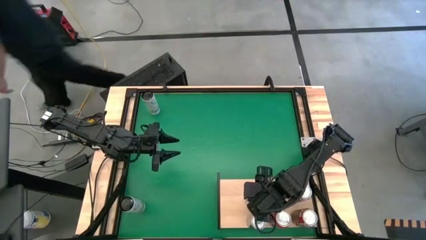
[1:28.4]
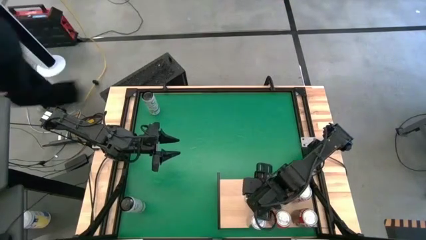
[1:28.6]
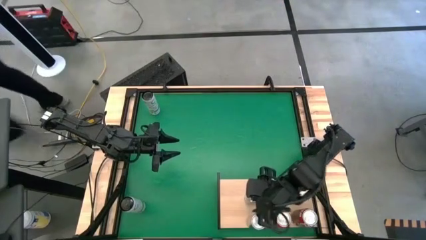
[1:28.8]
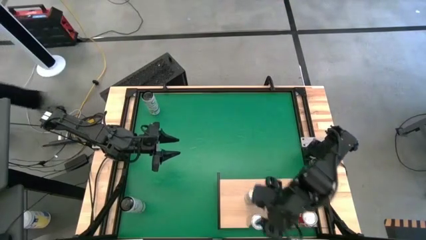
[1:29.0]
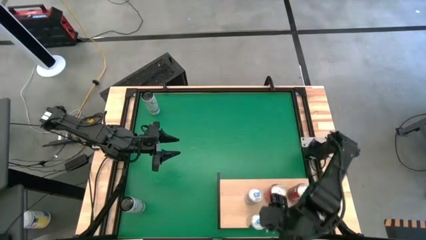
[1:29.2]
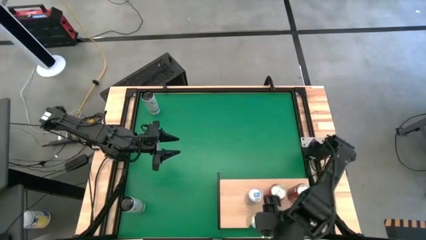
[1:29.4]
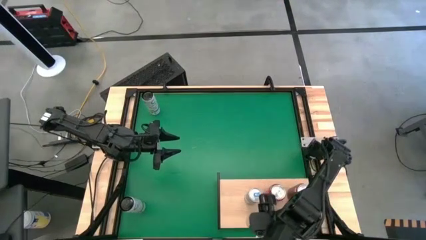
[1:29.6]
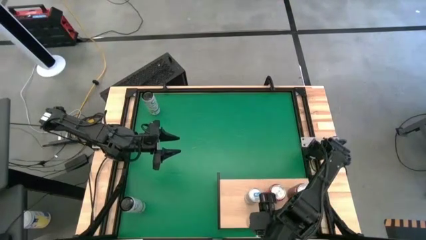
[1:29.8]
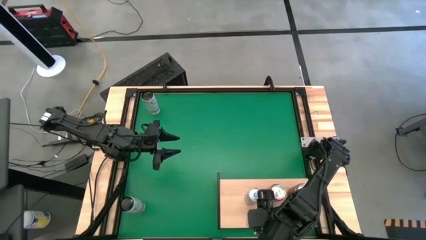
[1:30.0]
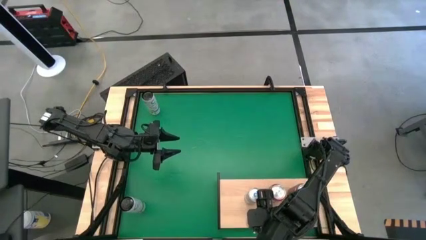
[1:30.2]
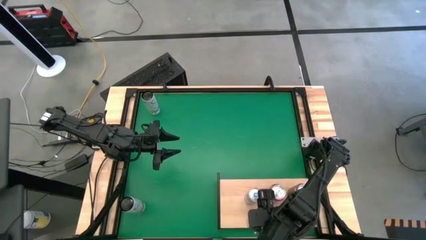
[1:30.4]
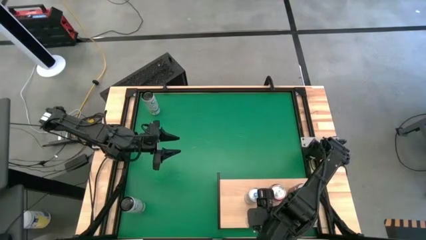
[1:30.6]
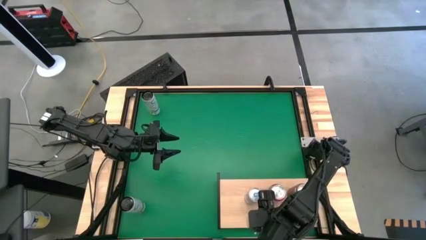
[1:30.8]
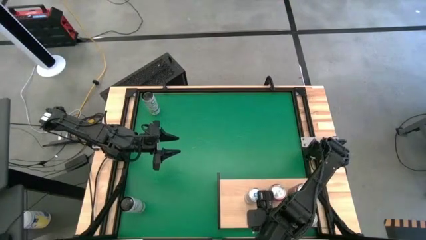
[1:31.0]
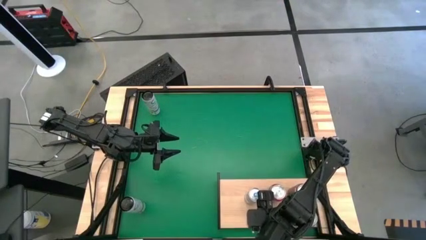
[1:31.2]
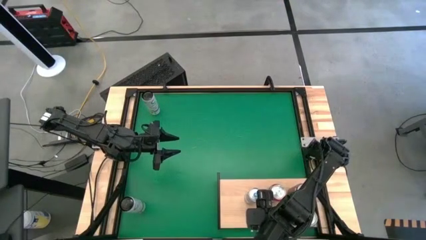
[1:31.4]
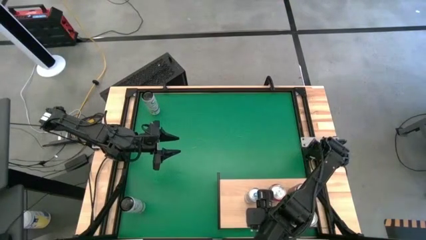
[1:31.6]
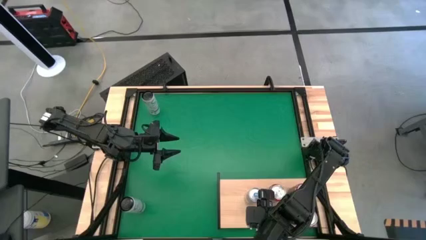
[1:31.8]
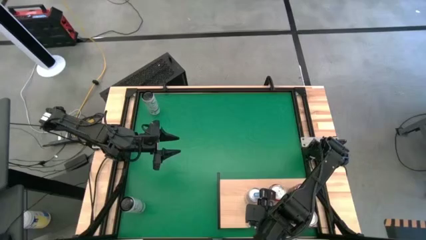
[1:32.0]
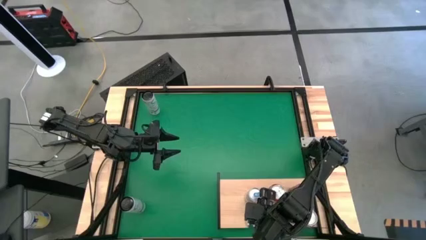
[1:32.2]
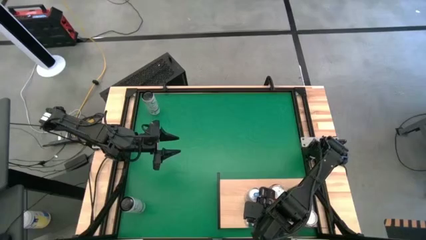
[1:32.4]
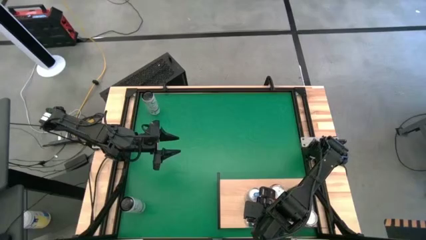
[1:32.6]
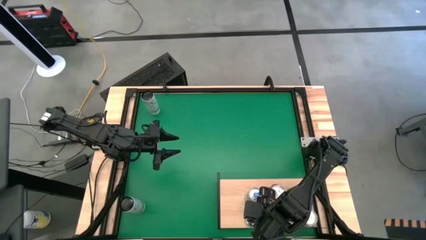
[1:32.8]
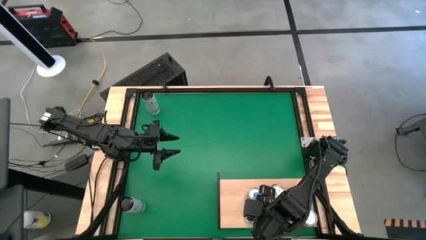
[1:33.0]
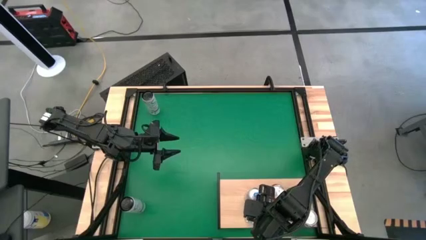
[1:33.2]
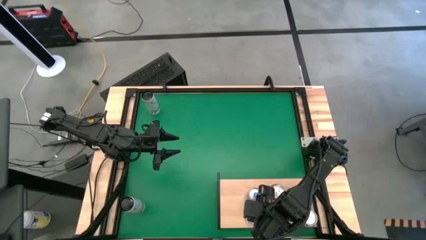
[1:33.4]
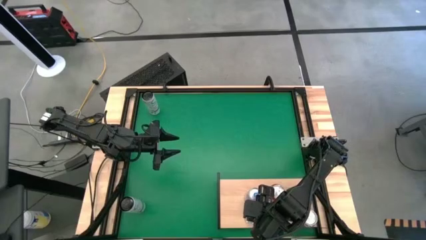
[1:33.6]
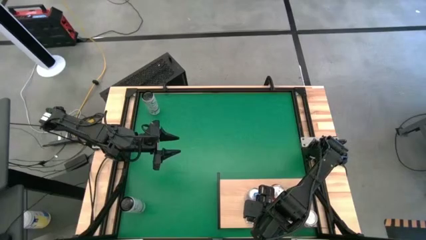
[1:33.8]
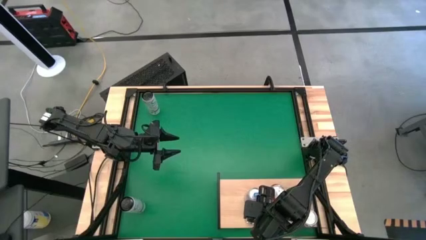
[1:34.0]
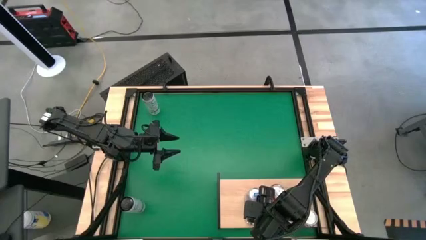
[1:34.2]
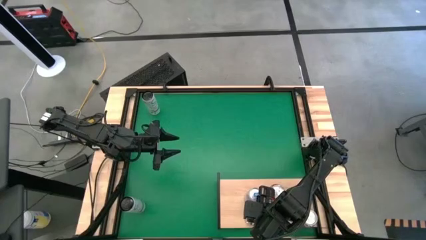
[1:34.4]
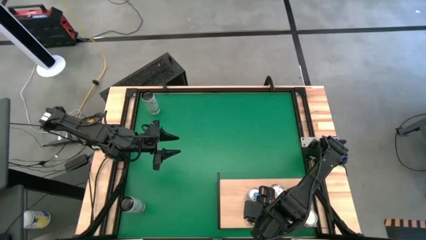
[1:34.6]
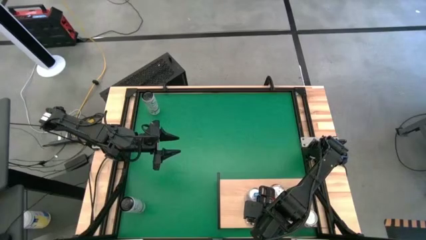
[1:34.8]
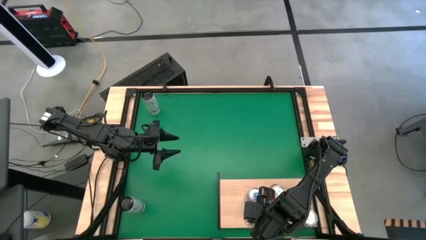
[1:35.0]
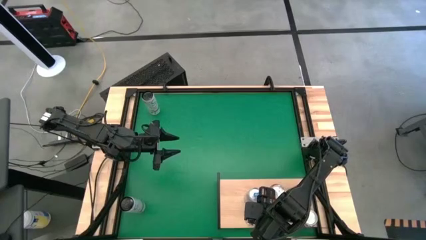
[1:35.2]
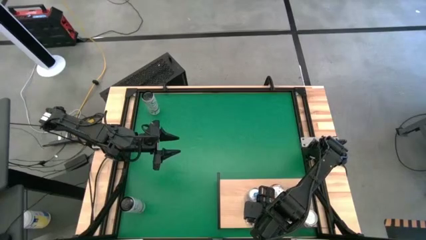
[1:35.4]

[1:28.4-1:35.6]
Task: Place canned beverage on shelf
Adjust the blue soda can

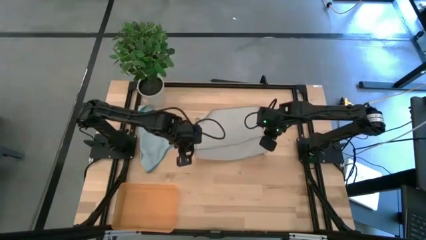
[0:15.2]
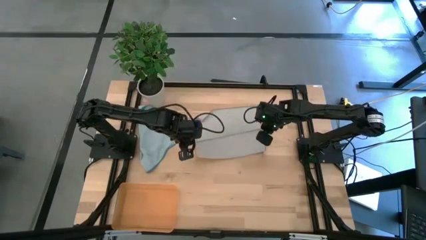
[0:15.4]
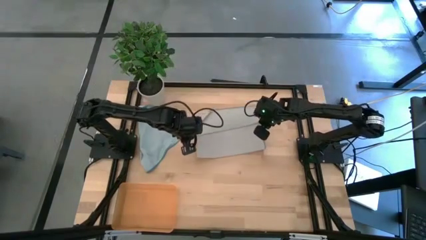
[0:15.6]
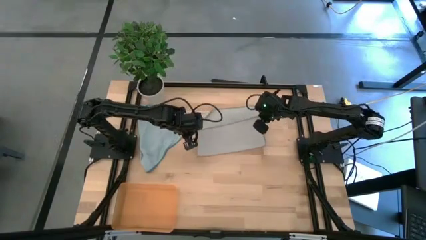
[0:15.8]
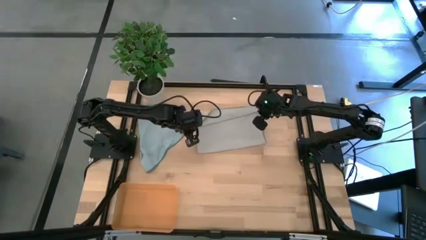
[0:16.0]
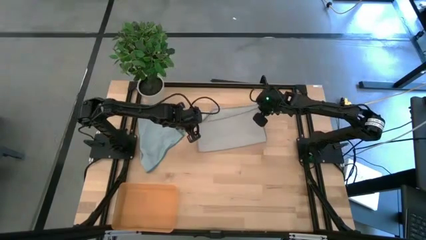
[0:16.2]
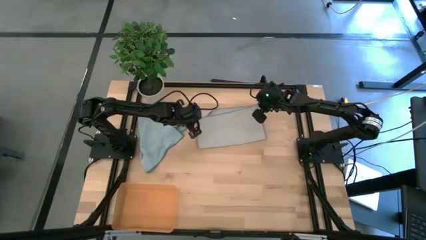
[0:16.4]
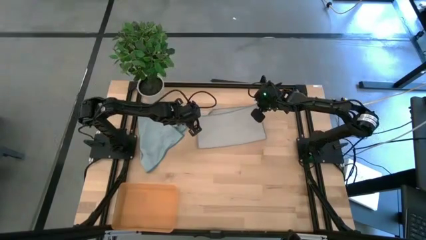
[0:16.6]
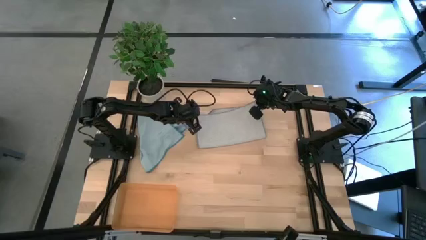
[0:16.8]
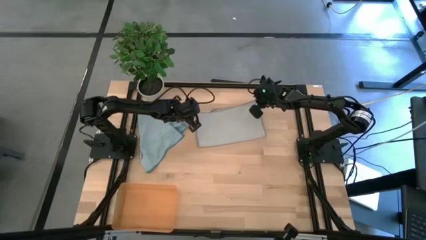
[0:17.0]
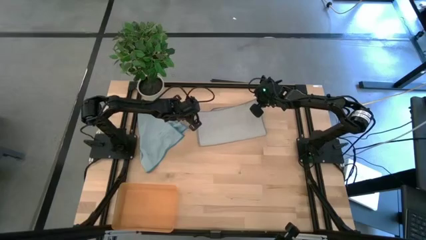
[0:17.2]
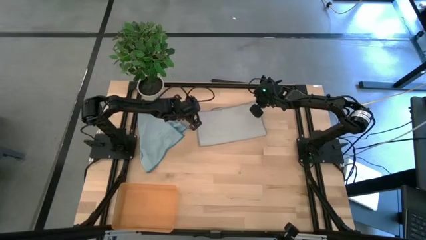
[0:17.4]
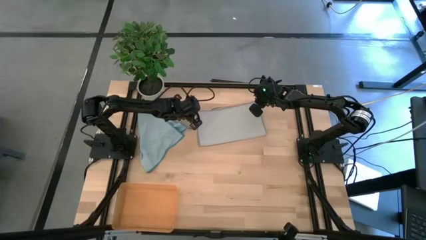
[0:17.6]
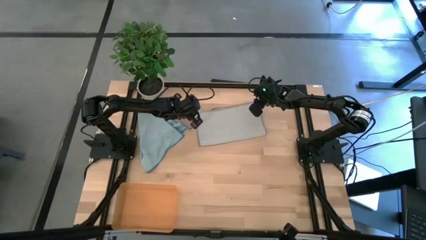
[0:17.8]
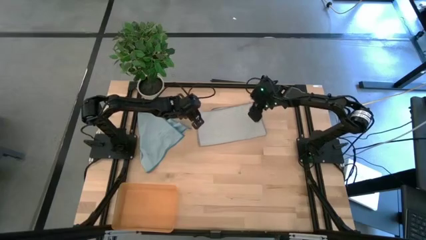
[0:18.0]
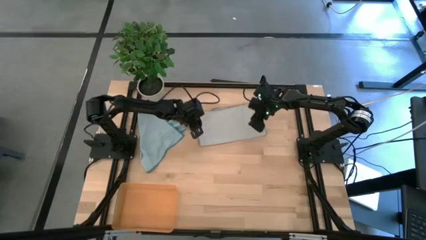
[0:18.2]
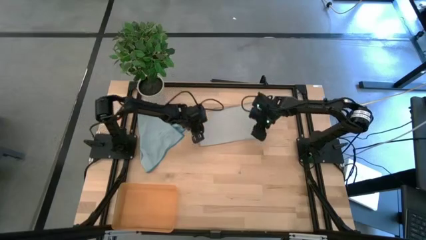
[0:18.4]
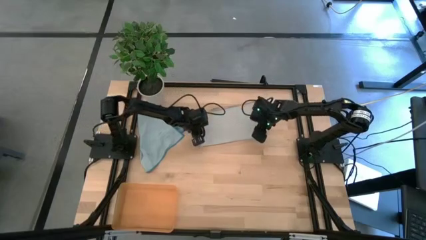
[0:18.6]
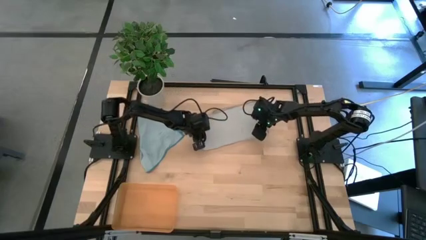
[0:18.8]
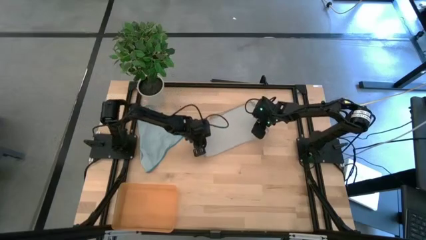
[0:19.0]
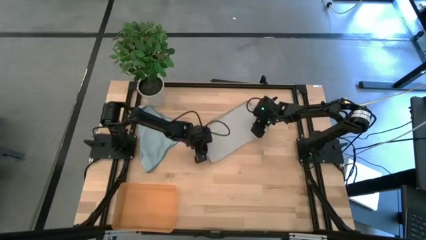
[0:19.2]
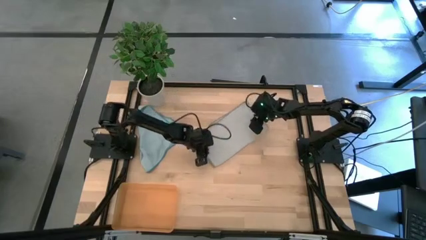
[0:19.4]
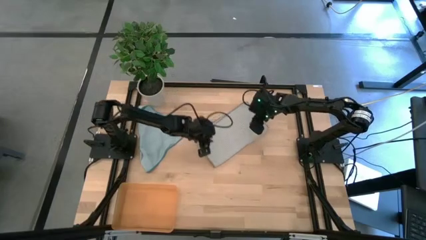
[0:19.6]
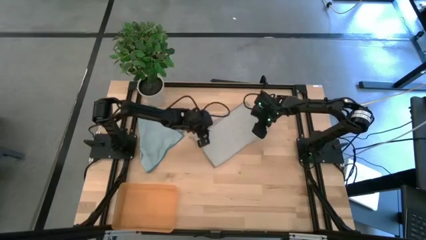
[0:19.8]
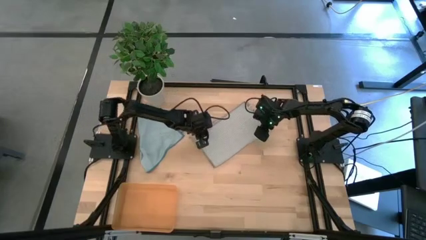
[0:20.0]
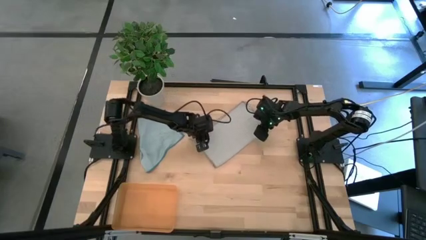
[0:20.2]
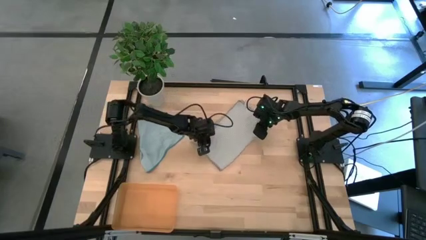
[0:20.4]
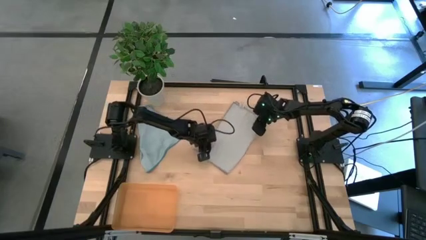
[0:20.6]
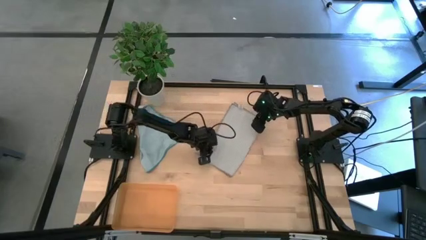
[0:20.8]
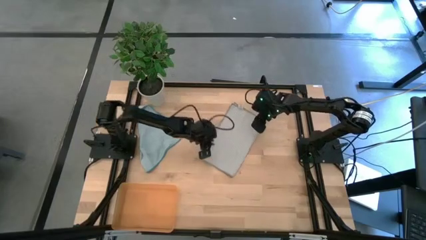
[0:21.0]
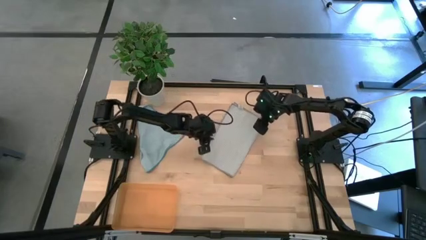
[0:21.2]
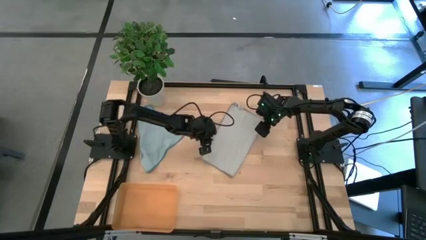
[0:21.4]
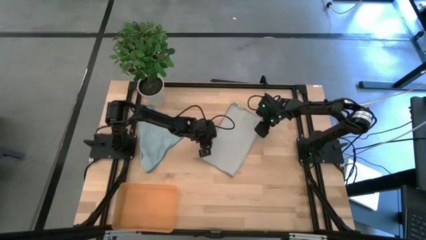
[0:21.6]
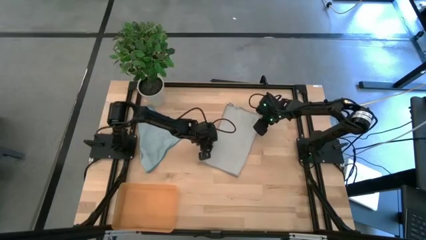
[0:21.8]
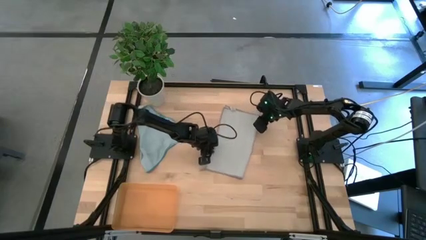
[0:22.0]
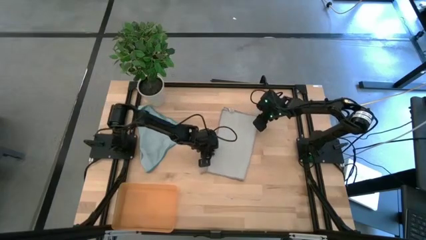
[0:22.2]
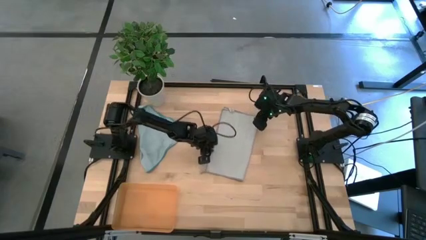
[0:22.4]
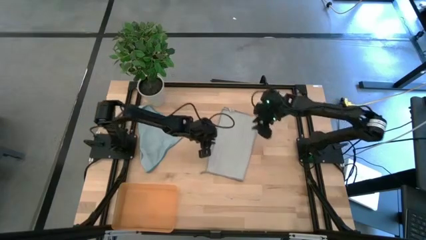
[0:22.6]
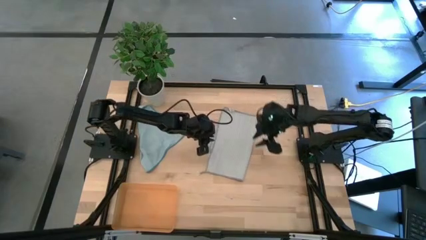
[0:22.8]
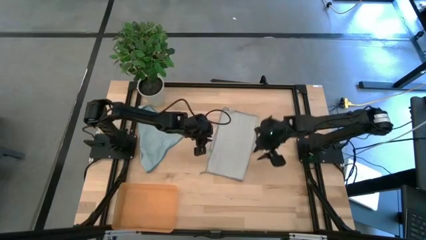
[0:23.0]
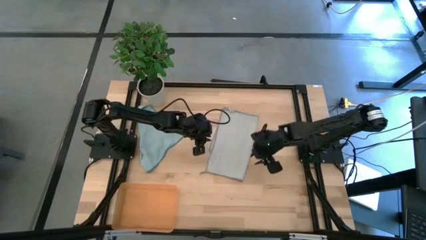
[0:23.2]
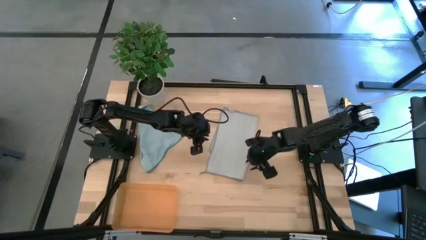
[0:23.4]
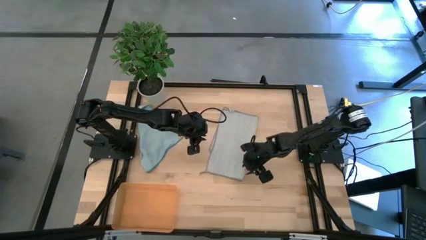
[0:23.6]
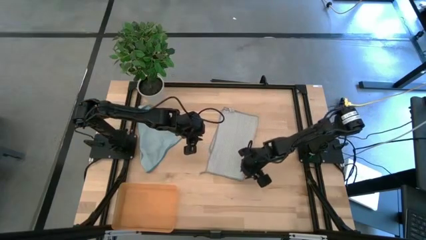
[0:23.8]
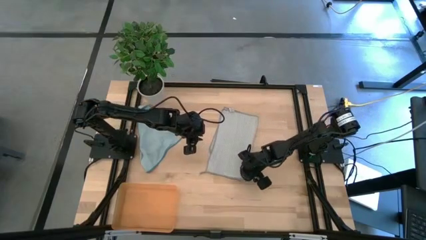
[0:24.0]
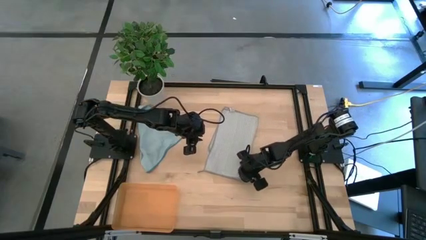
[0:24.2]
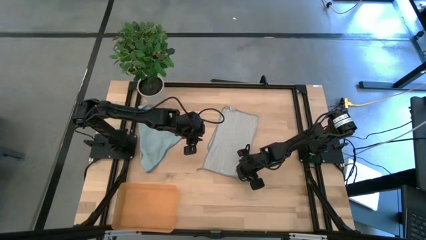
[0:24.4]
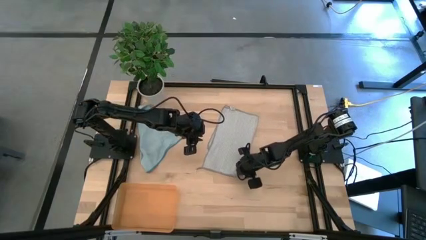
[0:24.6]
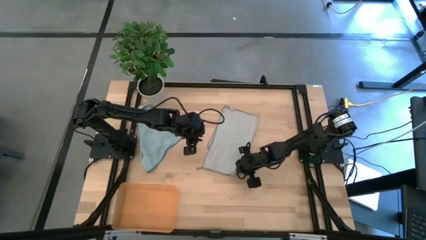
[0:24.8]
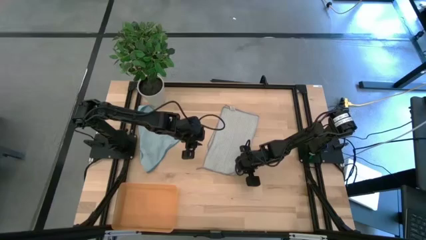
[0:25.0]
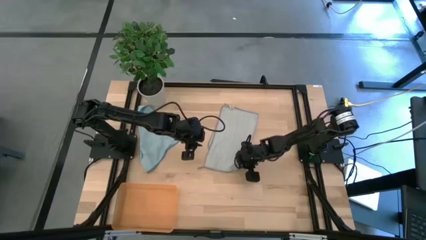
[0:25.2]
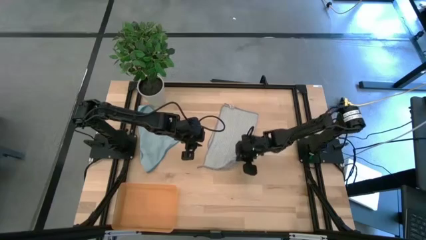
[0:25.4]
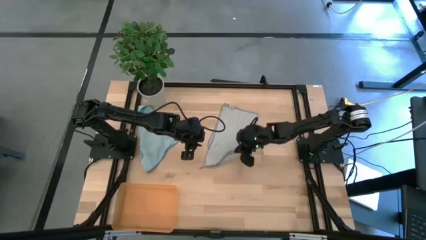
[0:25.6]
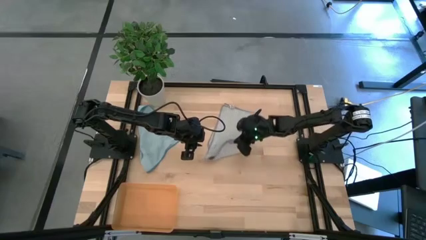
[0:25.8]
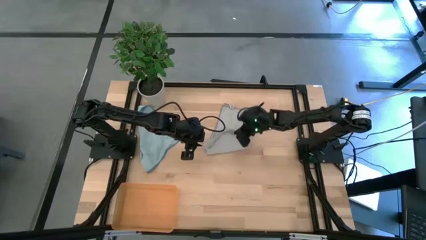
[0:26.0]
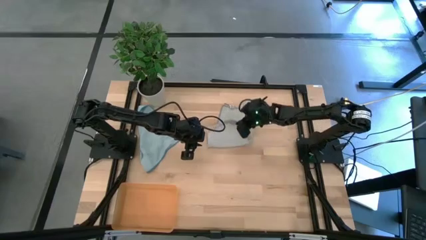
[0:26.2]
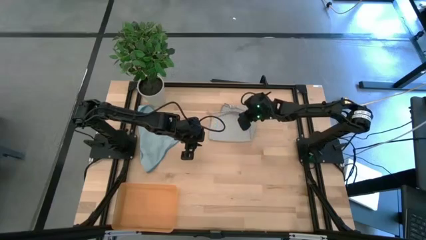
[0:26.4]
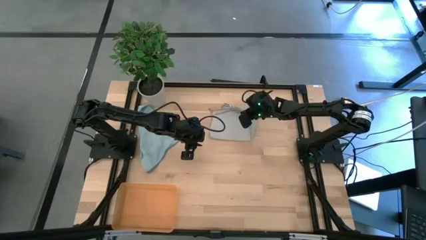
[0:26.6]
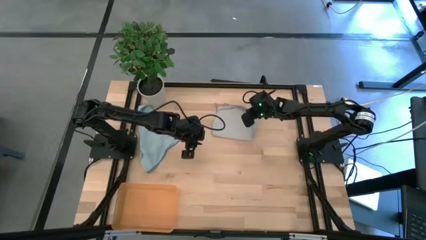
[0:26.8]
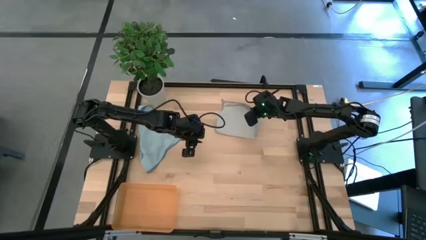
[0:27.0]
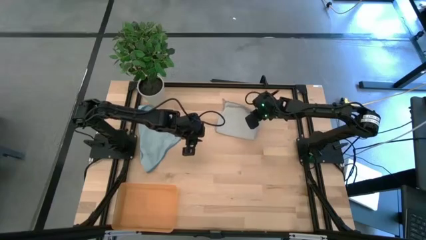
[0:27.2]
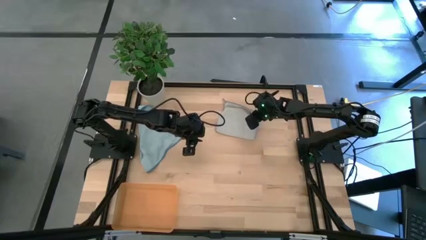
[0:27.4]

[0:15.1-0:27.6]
Task: Roll microfiber towels into tight, uniform cylinder then place into a basket
Fold the gray microfiber towel
